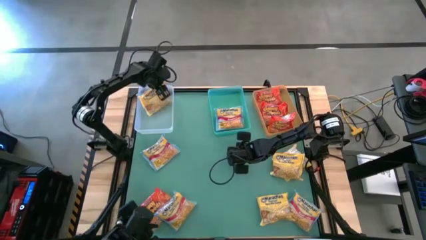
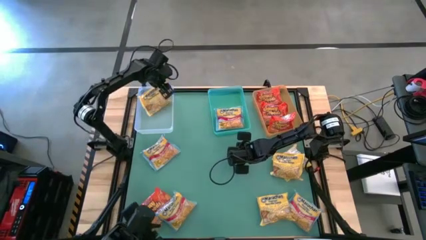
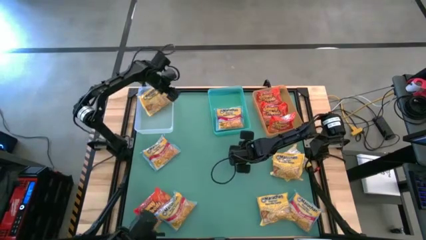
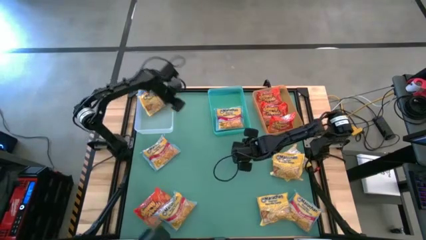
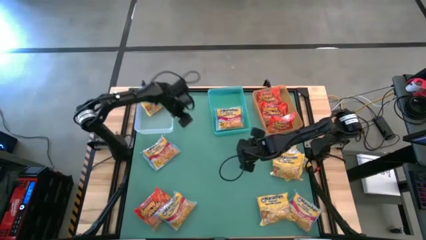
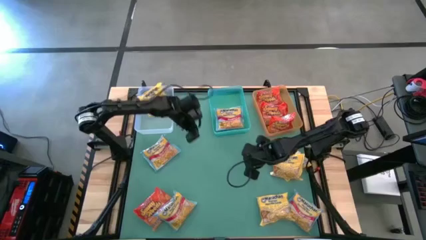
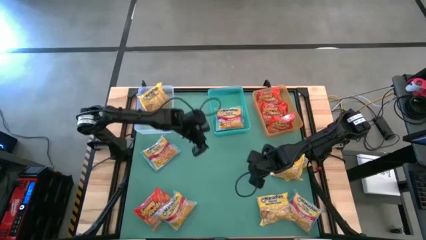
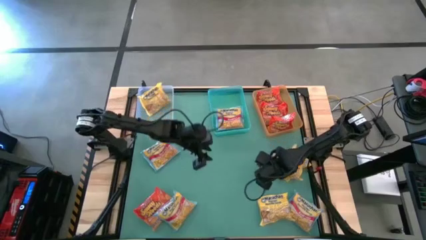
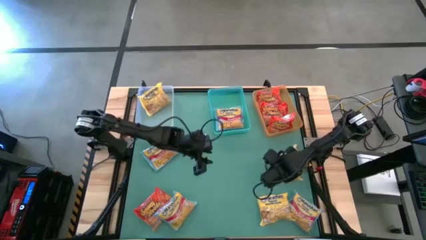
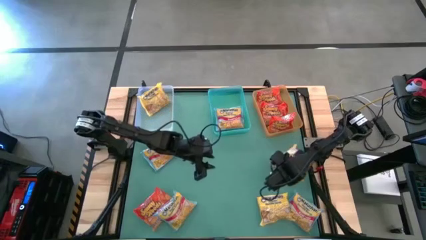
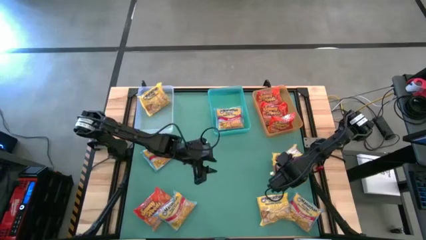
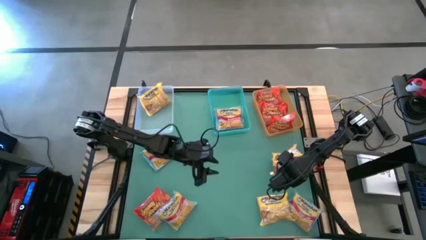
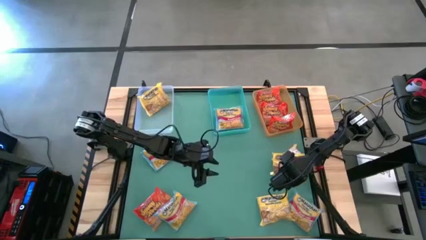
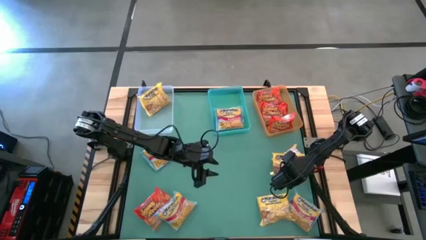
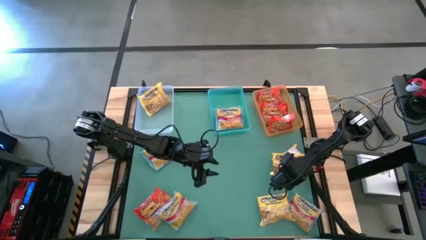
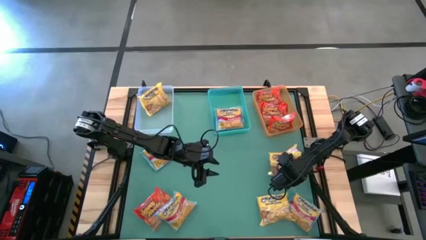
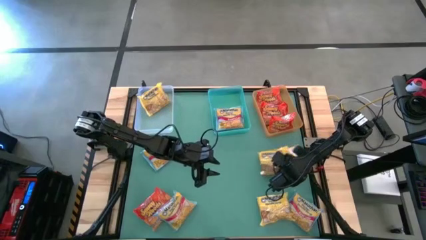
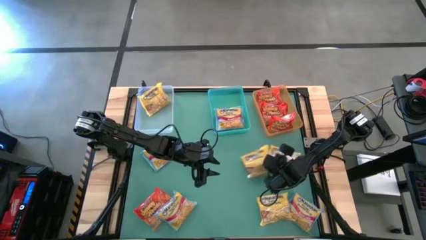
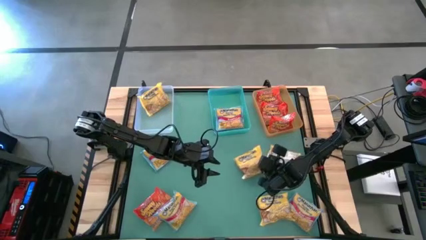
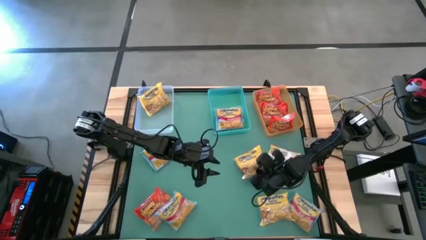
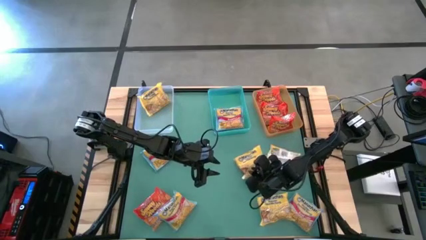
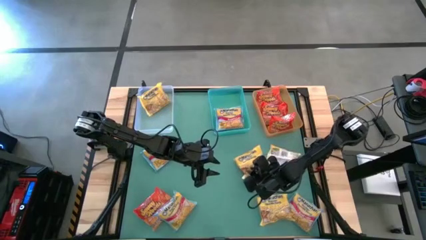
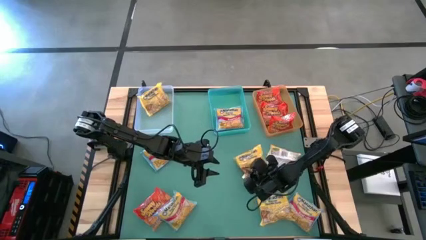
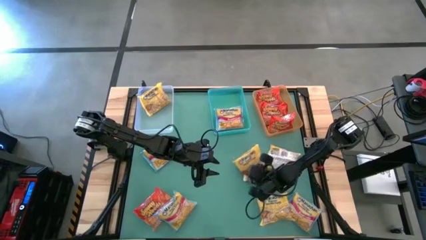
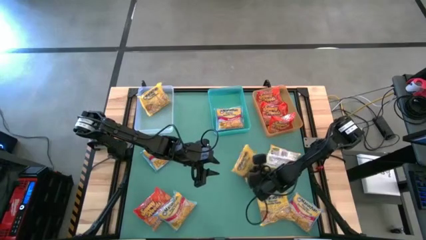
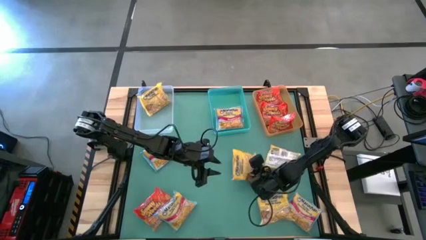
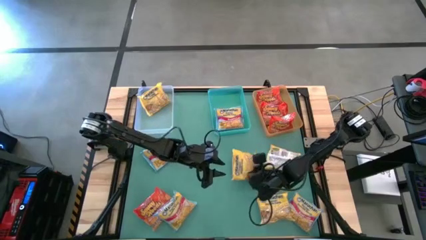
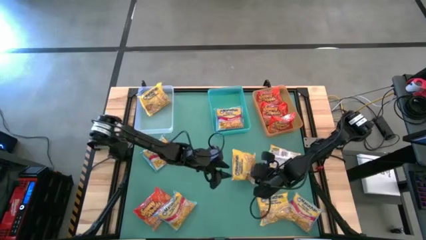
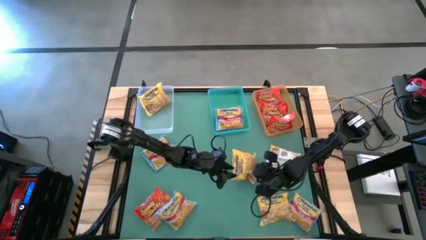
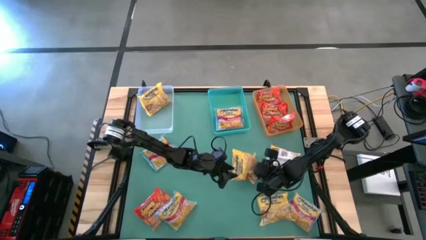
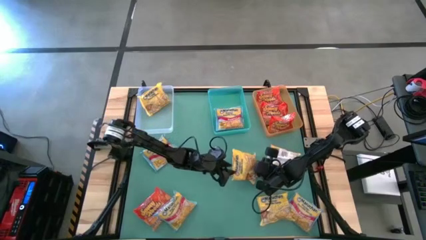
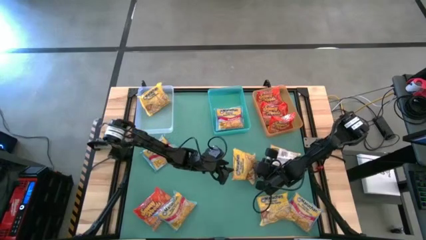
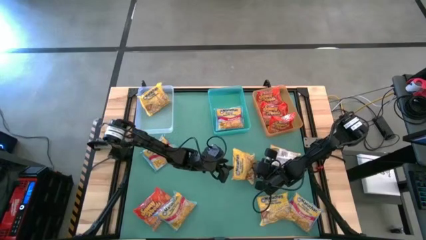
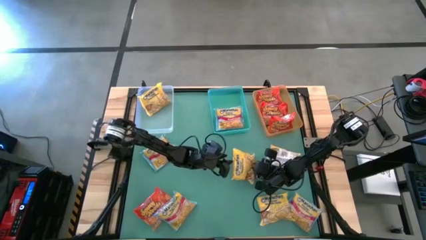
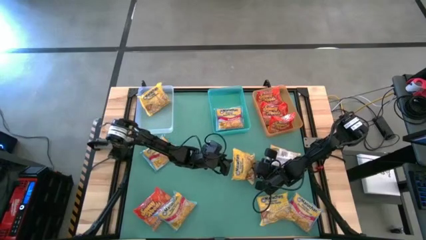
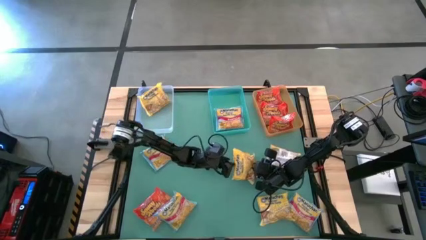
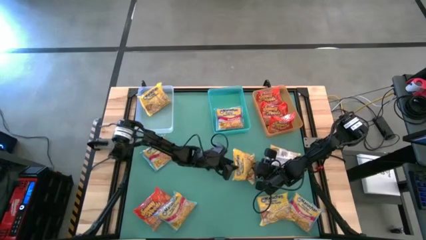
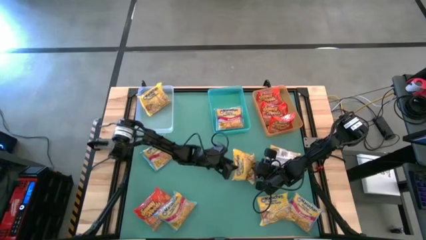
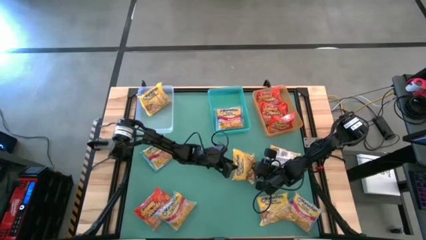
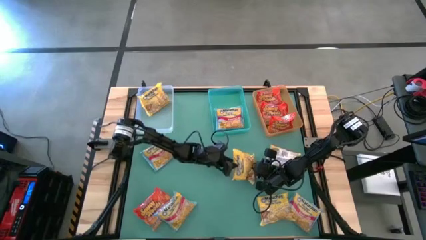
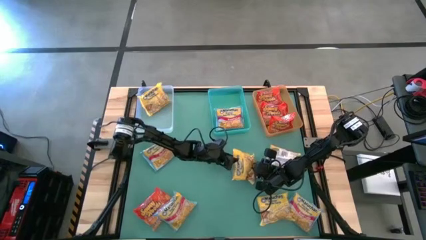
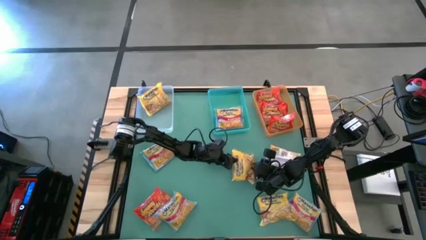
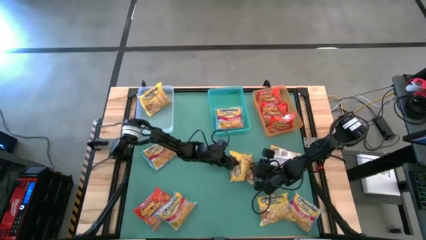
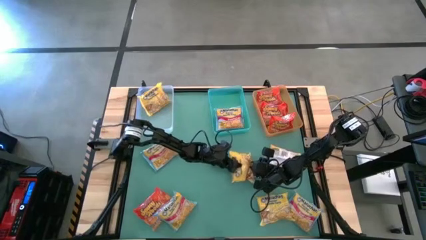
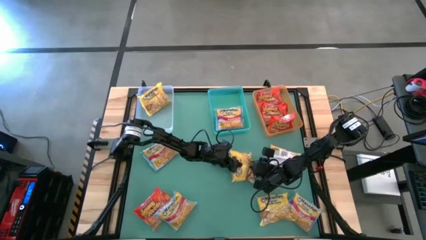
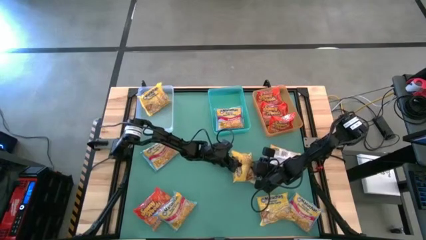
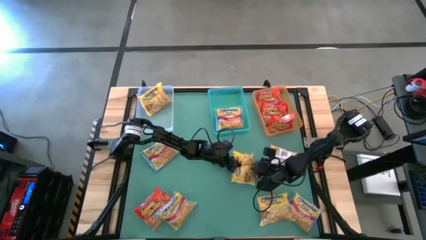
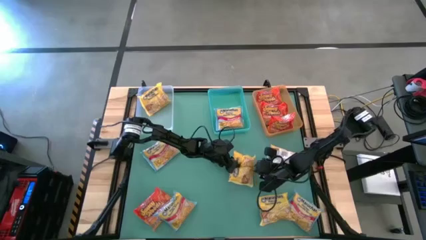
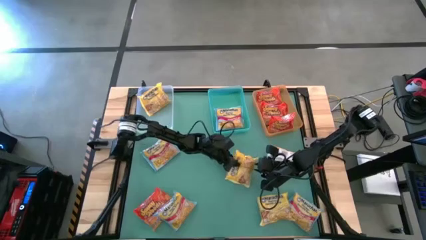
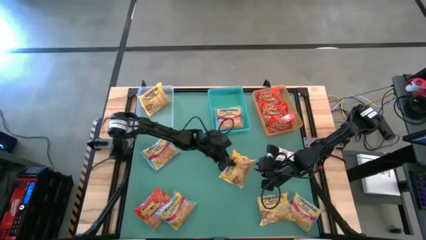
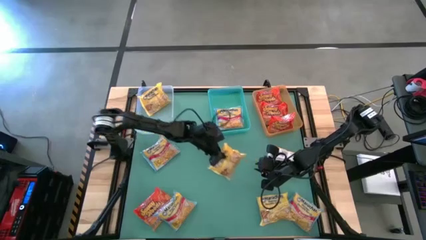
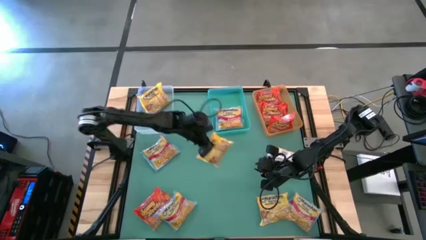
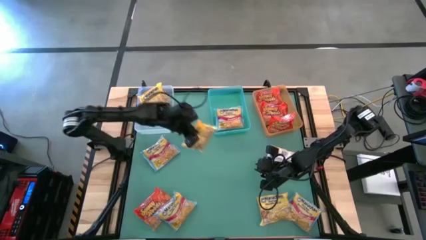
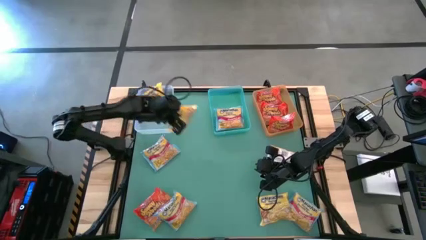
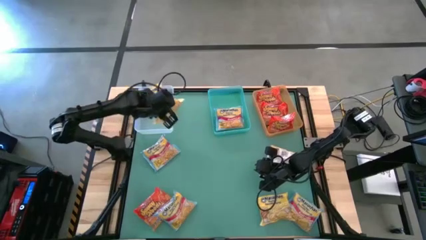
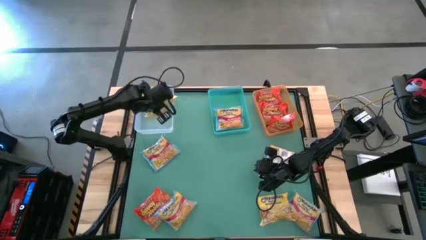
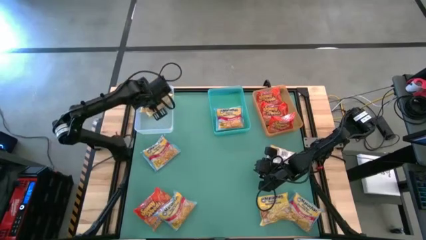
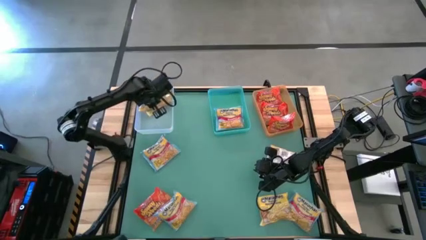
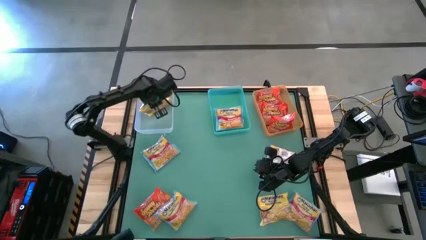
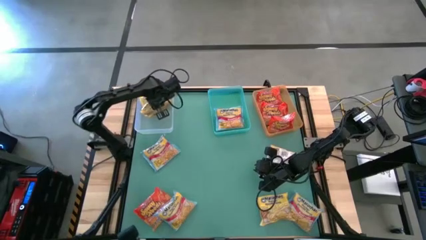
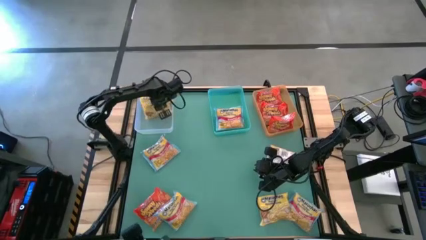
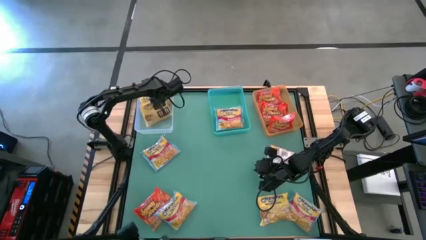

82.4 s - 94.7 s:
Task: Sort Maruchan noodles
Put the yellow noodle pack into the white bin
